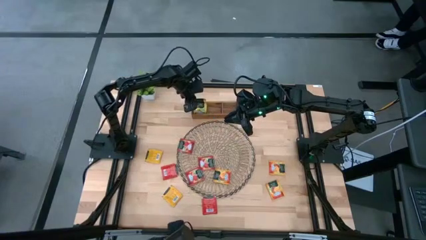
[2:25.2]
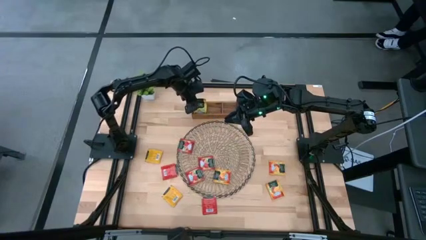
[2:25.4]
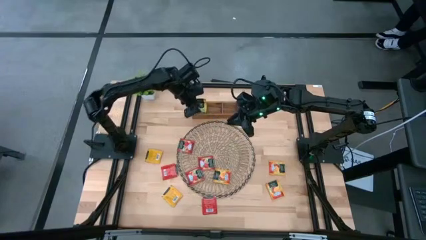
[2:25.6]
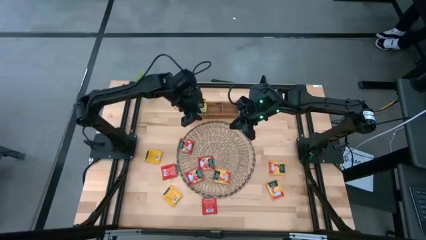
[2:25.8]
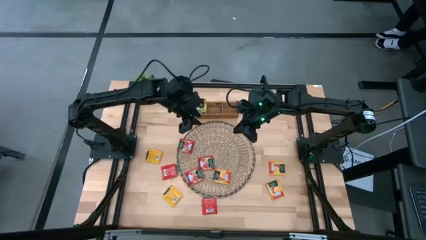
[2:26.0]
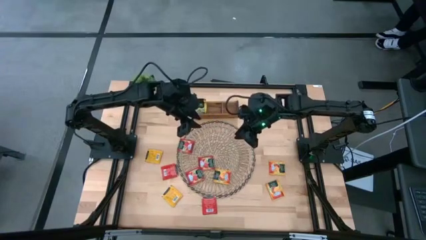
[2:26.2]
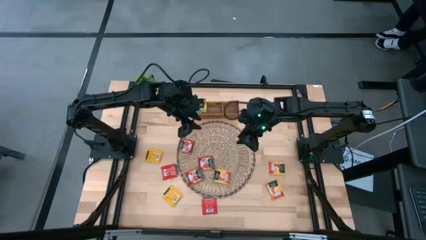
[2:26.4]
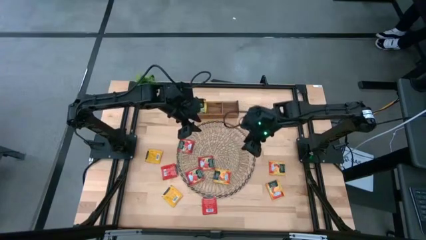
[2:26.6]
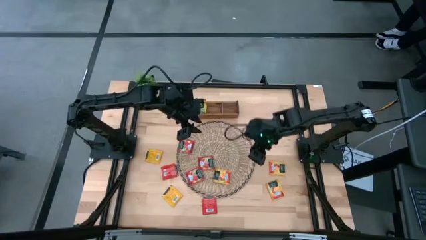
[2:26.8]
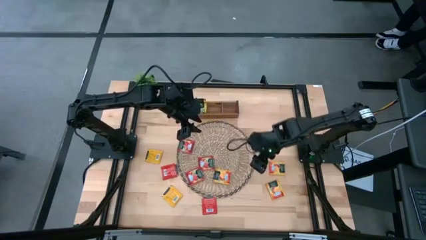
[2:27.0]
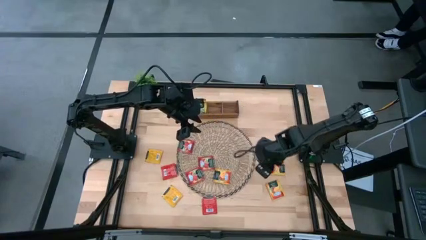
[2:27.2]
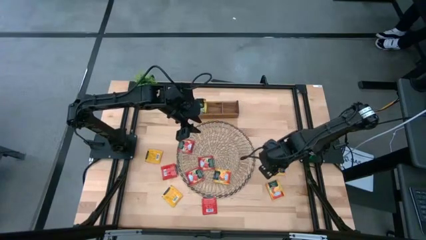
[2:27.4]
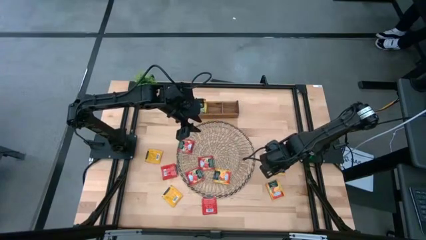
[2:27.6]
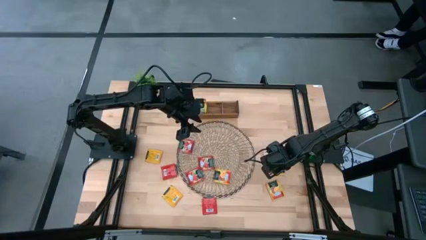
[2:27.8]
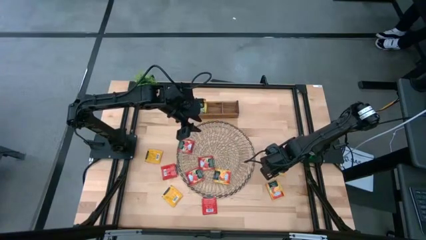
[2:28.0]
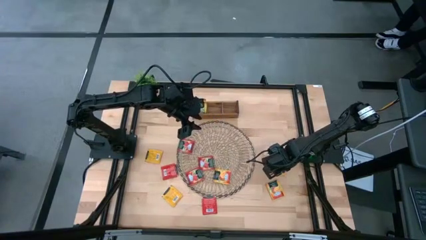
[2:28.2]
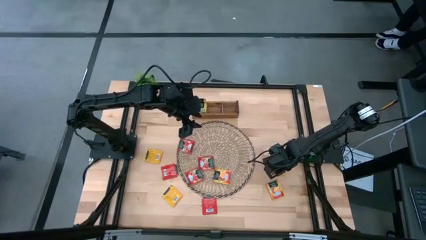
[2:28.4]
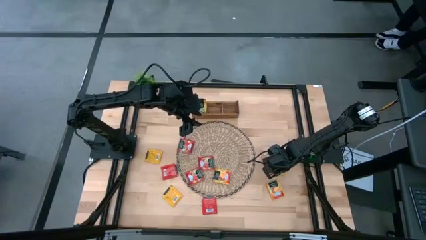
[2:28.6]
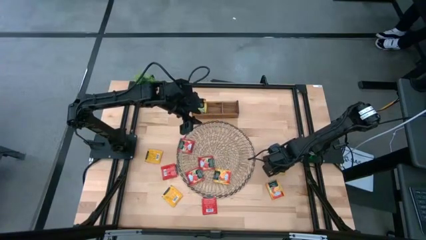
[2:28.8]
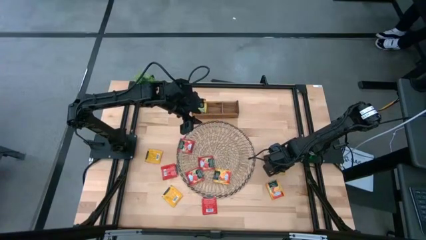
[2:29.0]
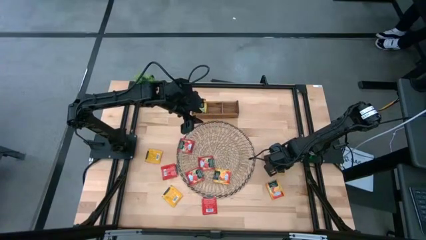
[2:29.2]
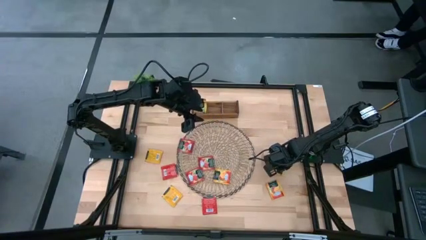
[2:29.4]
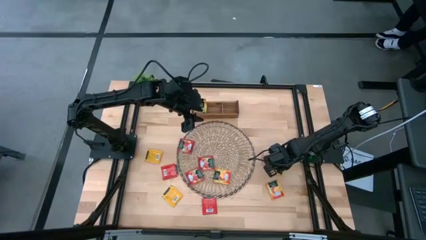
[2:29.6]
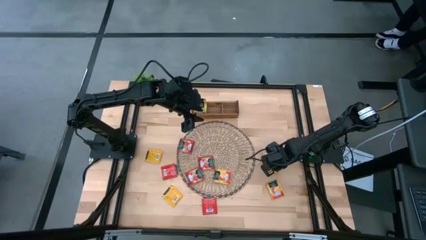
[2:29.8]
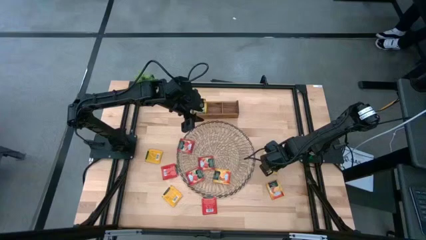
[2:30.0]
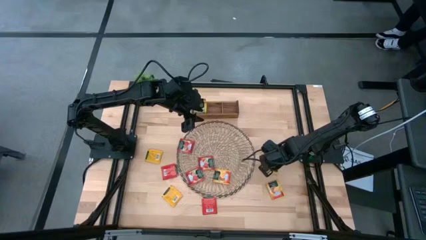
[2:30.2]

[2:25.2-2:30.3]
Task: Pick & Place Tea
Put the orange tea bag into the middle of the wooden organizer

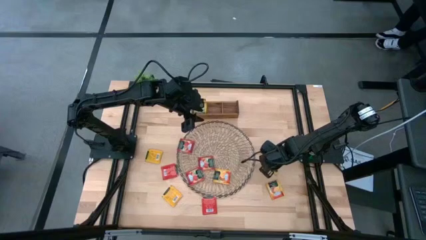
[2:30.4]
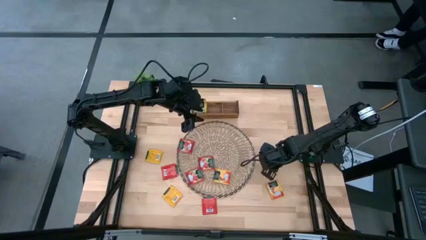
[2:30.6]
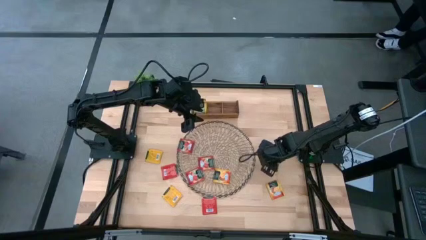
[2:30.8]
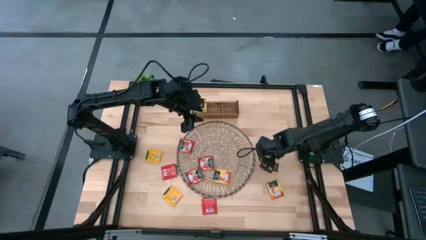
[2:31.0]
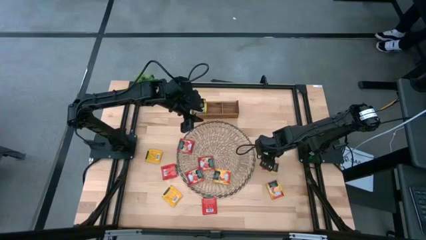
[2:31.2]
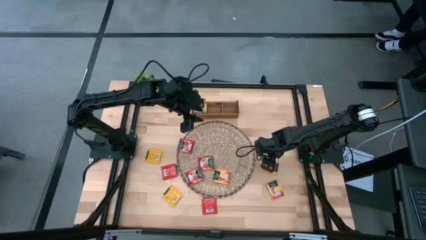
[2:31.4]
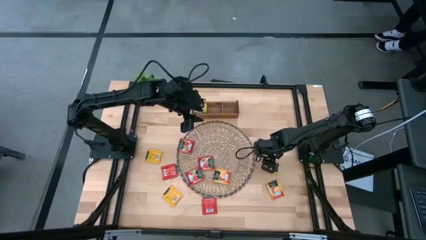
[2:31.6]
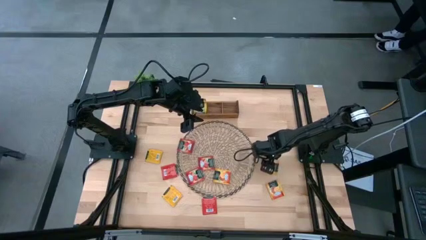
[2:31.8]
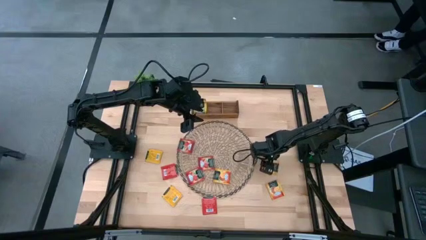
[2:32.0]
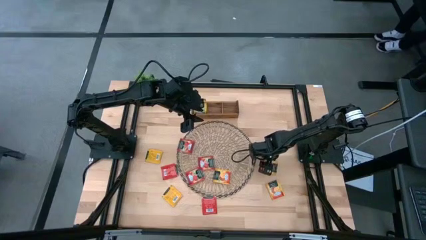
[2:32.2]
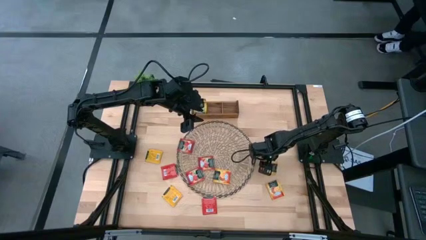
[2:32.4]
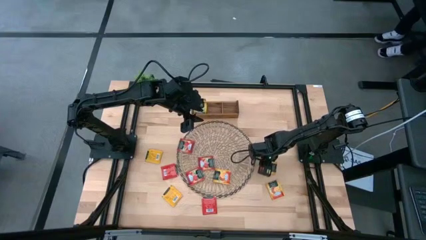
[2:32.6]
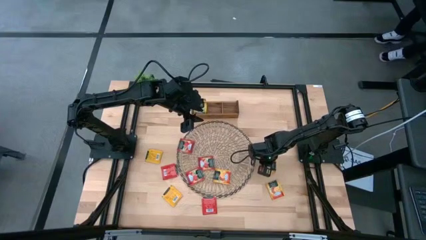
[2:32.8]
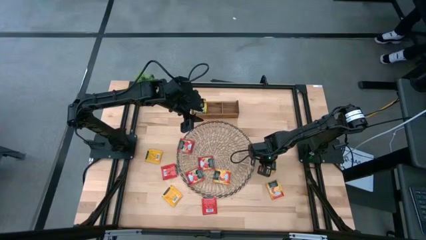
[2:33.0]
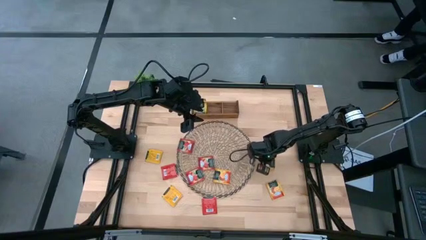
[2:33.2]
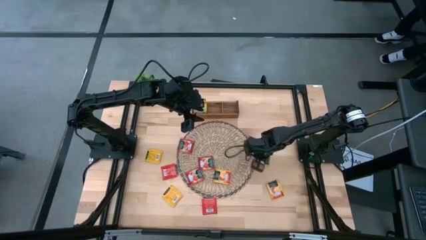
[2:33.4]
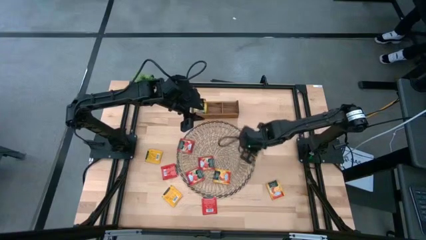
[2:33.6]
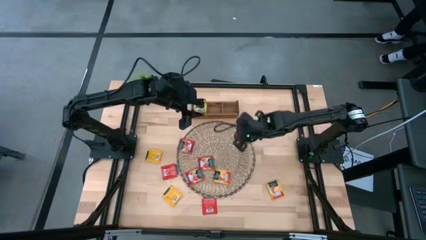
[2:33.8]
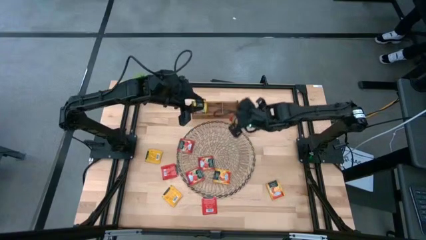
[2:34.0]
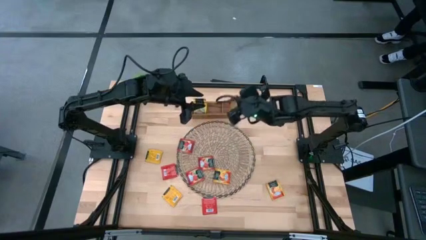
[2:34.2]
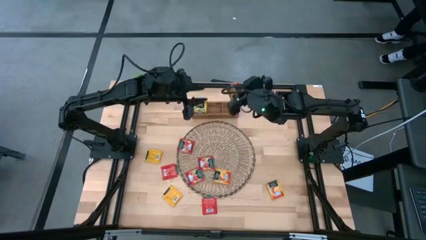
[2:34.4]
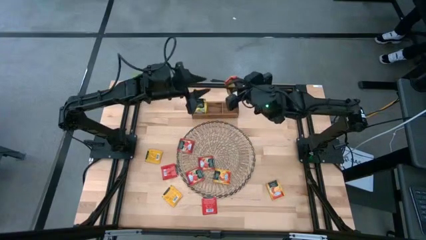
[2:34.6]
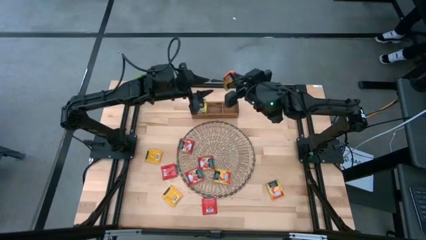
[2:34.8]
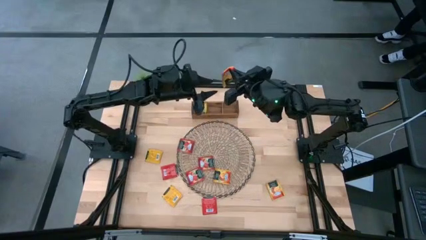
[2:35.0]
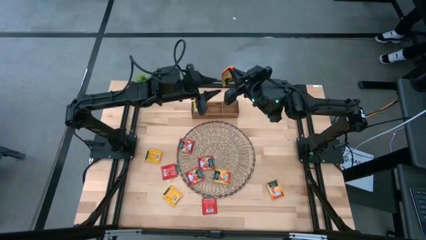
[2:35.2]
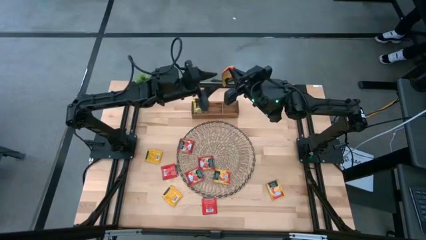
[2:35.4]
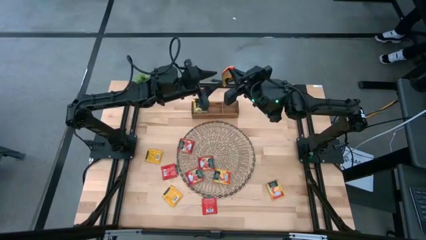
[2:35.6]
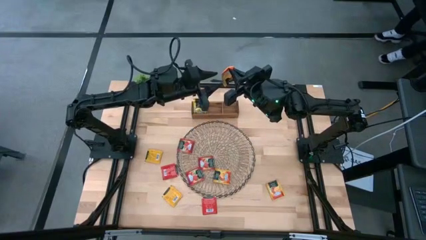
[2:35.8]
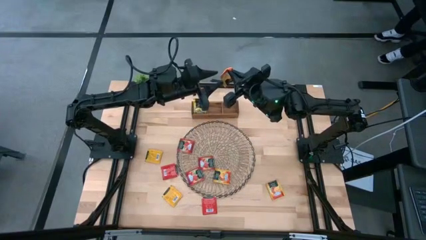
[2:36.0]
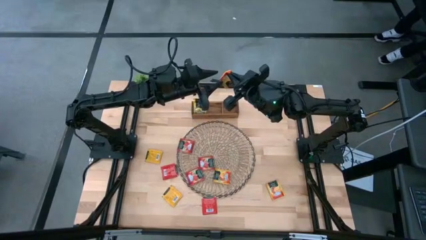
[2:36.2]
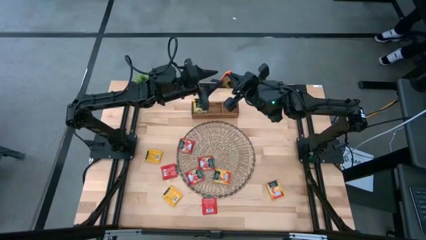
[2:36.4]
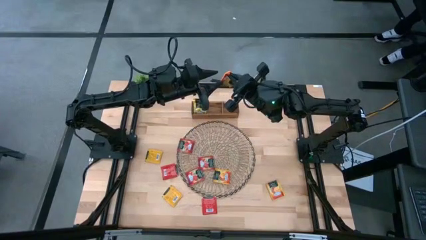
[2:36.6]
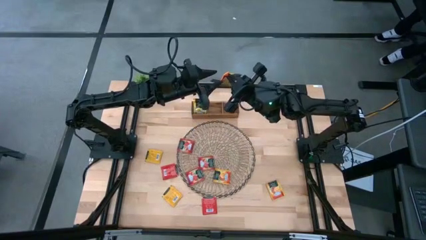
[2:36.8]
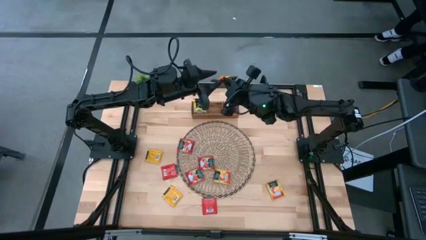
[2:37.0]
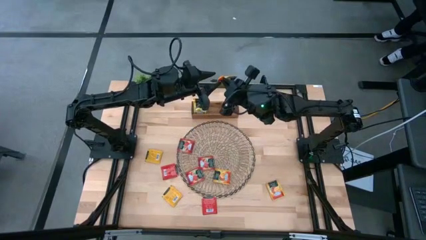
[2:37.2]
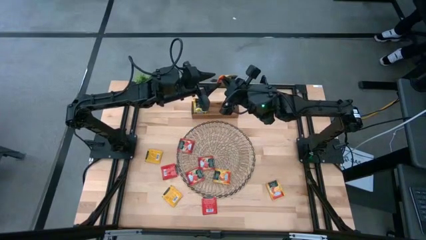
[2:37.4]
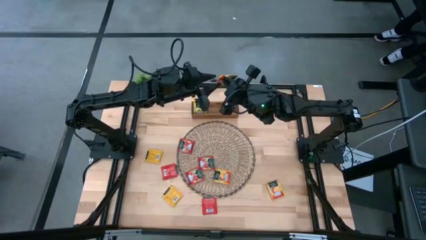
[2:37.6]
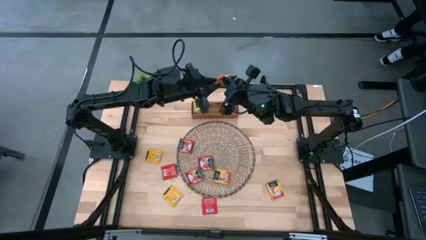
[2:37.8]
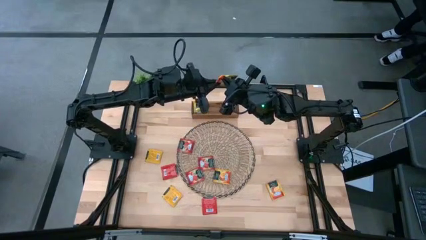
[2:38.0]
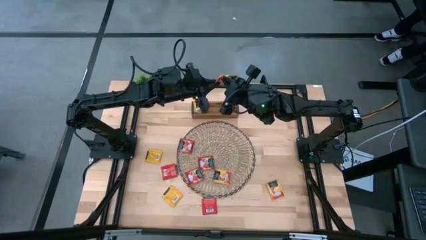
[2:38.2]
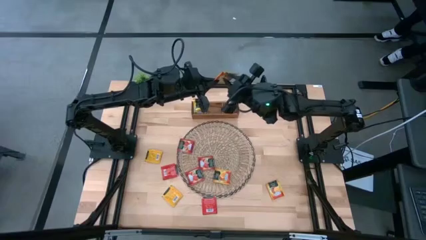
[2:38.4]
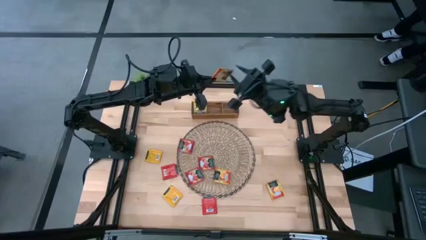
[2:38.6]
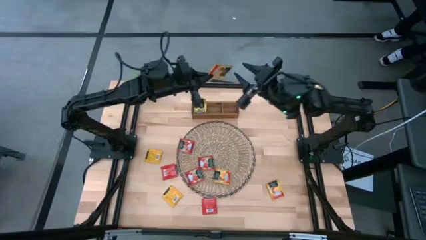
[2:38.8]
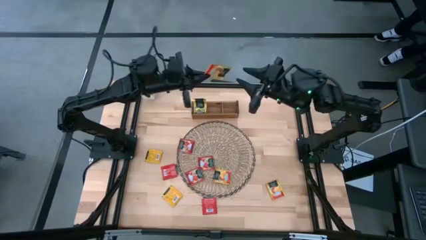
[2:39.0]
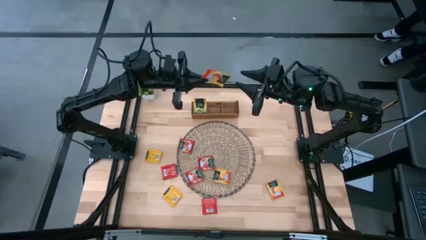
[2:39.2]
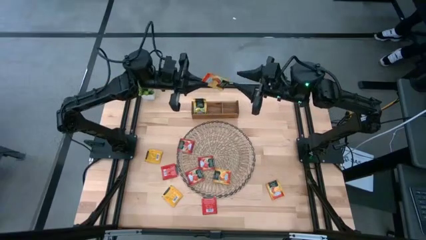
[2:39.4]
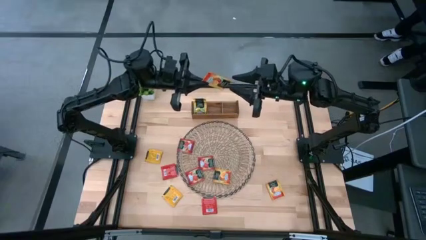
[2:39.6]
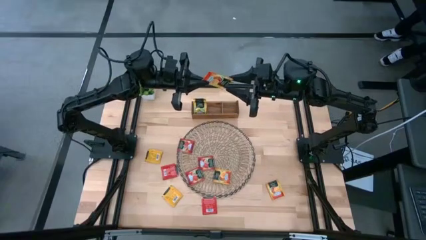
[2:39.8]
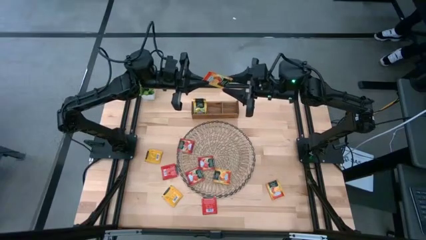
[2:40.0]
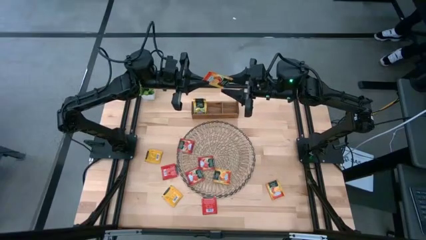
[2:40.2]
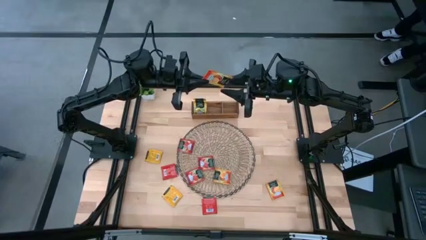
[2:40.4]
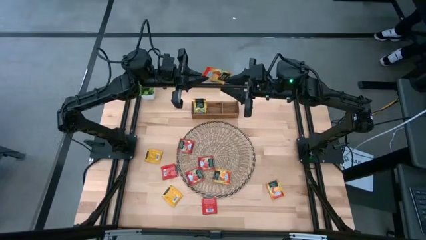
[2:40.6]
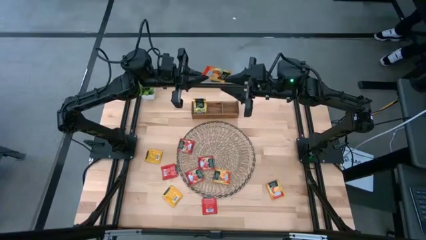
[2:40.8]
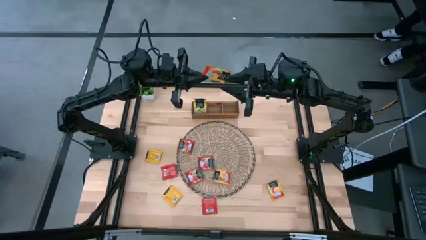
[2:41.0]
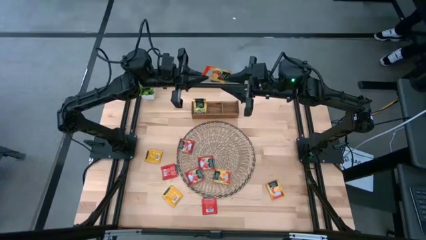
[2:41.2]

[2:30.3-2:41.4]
Put the orange tea bag into the middle of the wooden organizer
